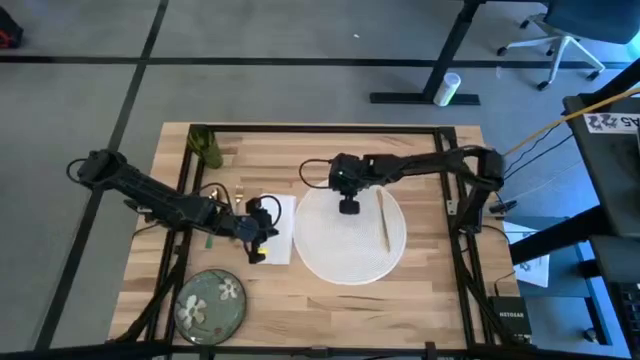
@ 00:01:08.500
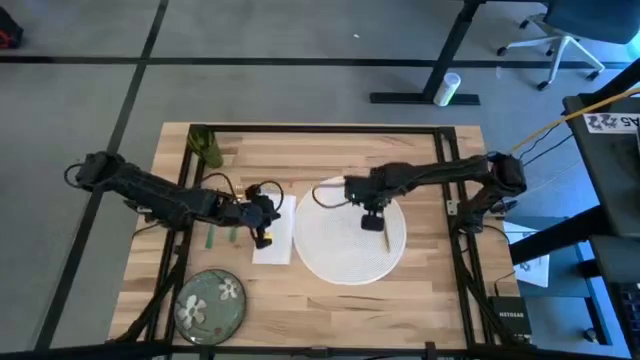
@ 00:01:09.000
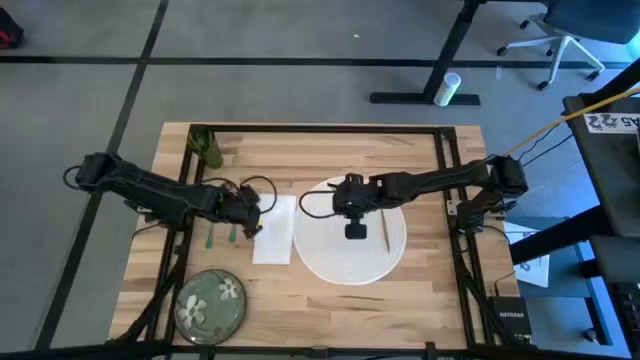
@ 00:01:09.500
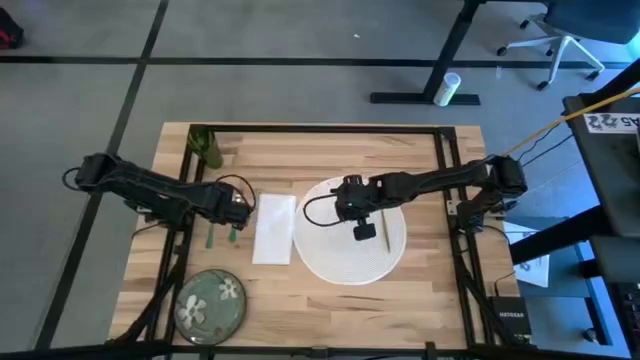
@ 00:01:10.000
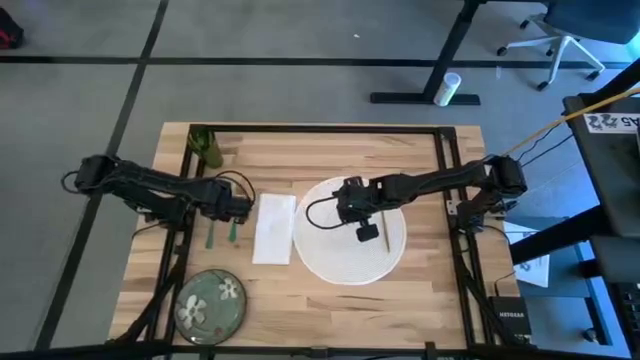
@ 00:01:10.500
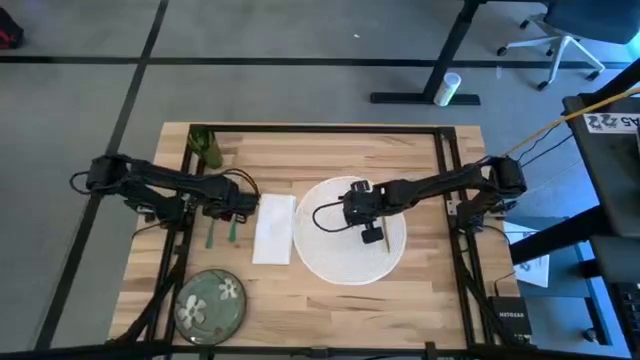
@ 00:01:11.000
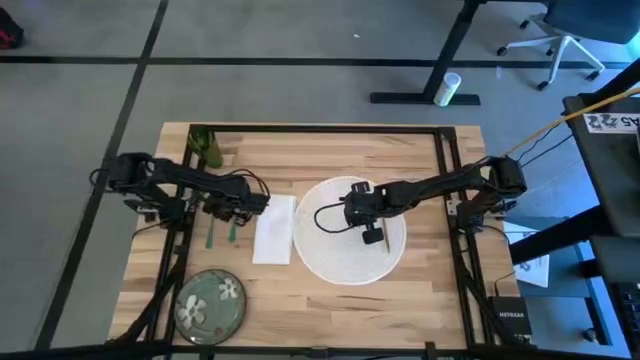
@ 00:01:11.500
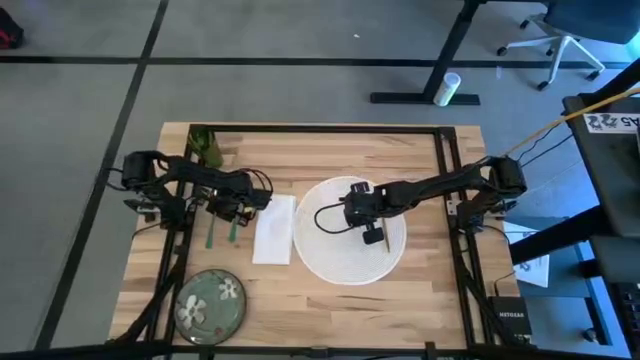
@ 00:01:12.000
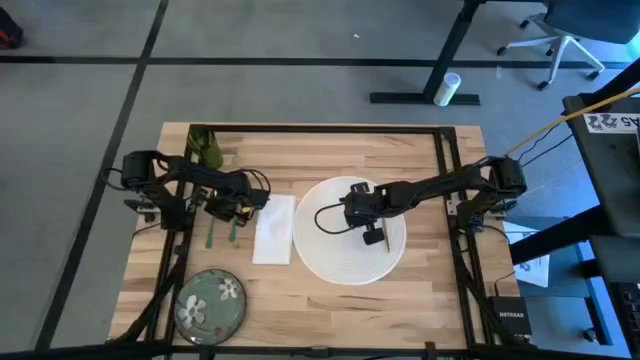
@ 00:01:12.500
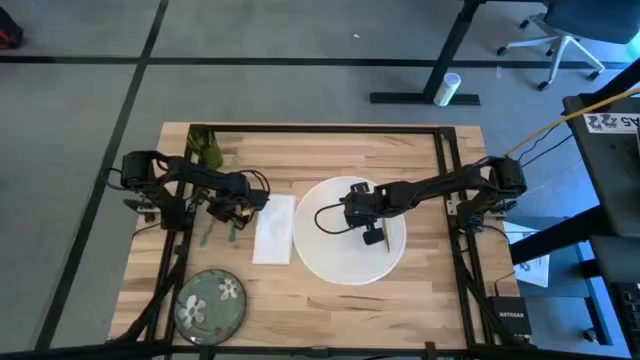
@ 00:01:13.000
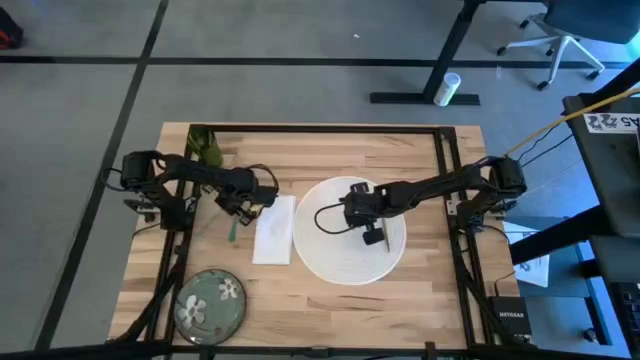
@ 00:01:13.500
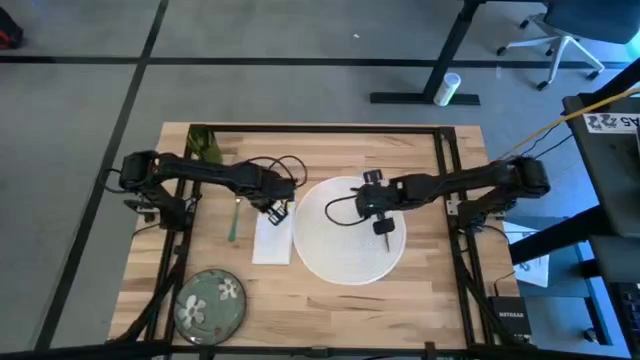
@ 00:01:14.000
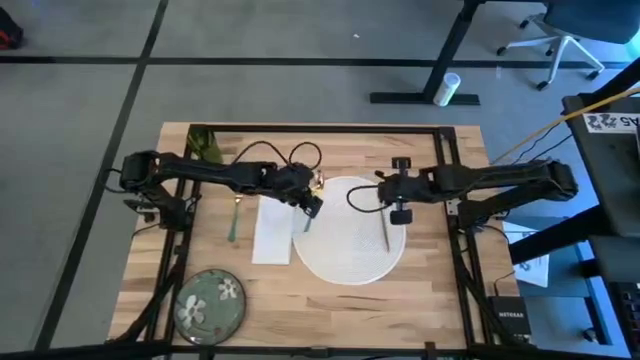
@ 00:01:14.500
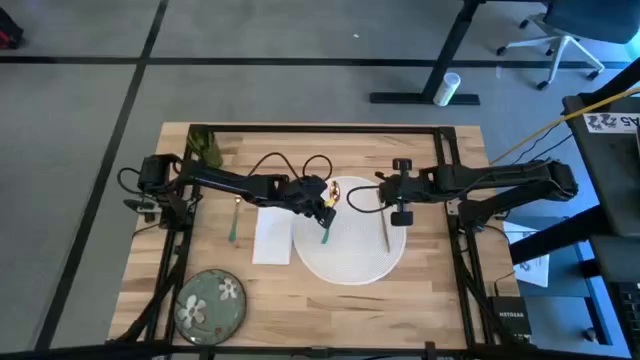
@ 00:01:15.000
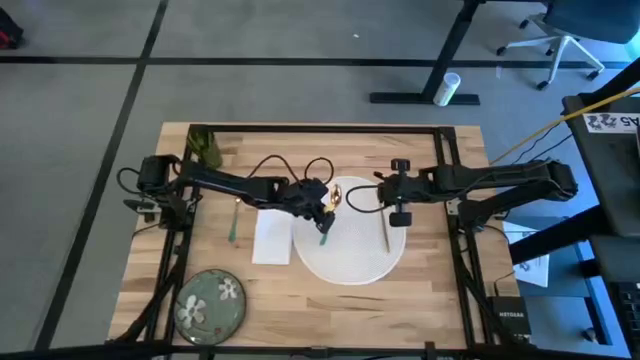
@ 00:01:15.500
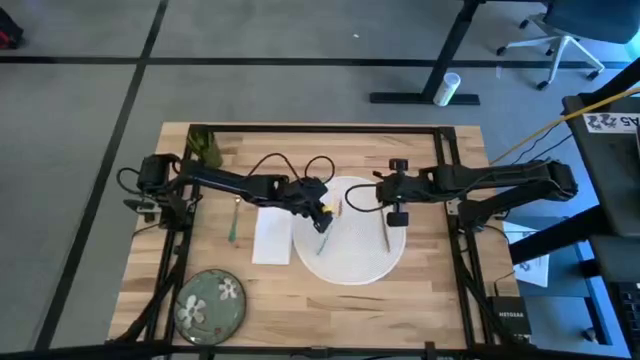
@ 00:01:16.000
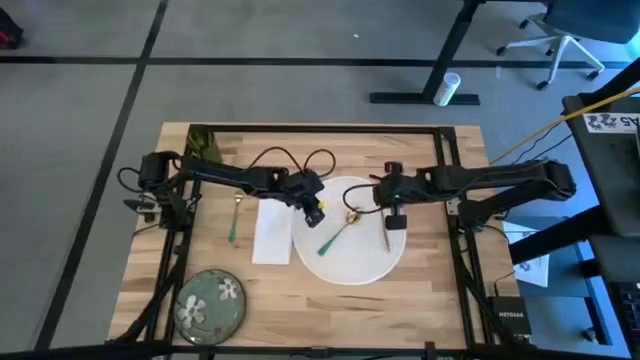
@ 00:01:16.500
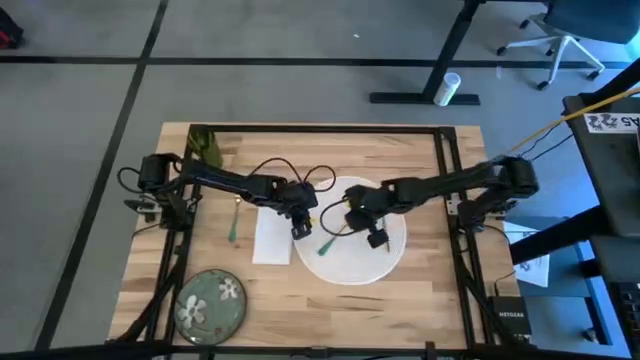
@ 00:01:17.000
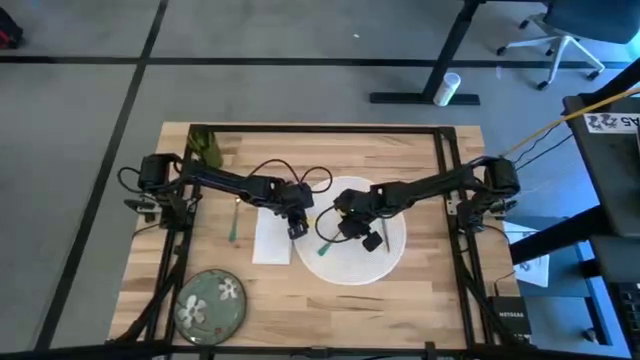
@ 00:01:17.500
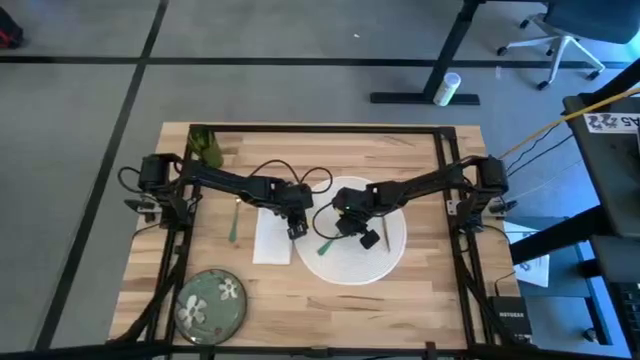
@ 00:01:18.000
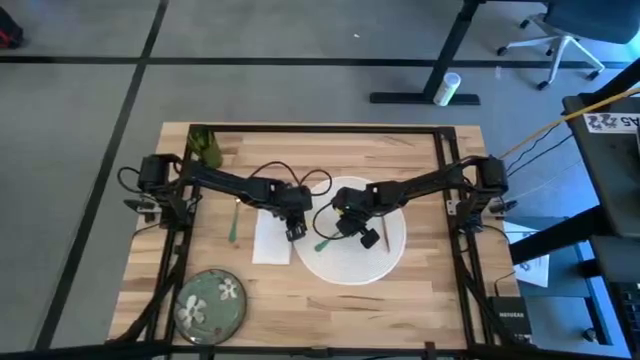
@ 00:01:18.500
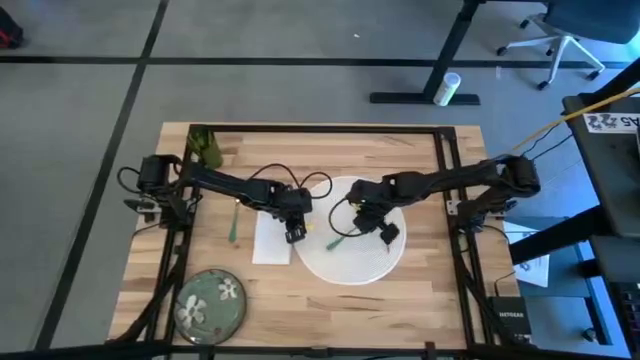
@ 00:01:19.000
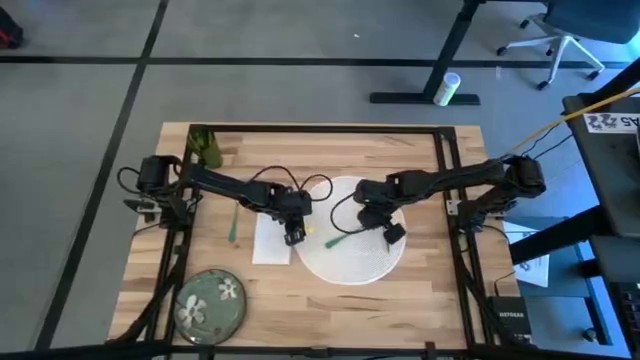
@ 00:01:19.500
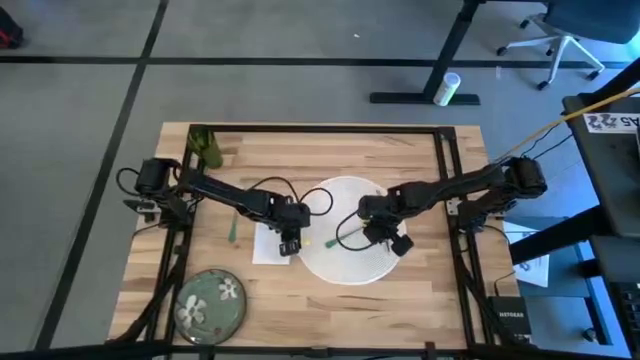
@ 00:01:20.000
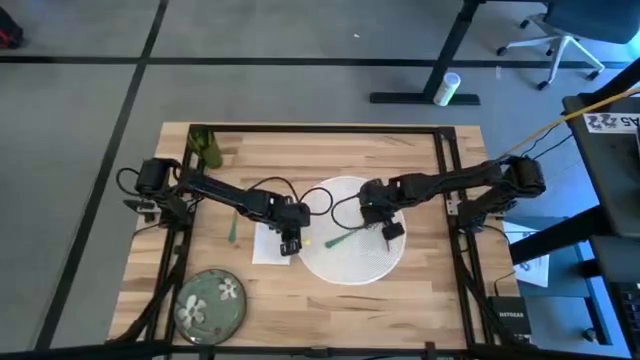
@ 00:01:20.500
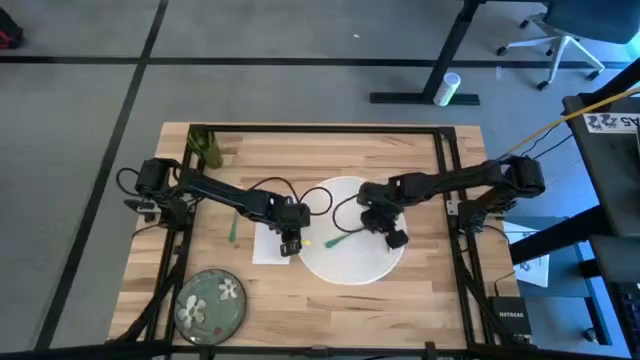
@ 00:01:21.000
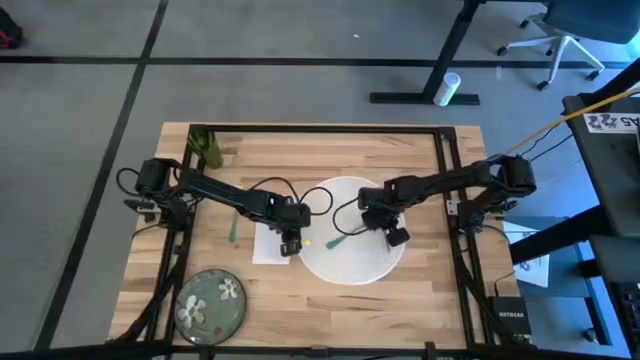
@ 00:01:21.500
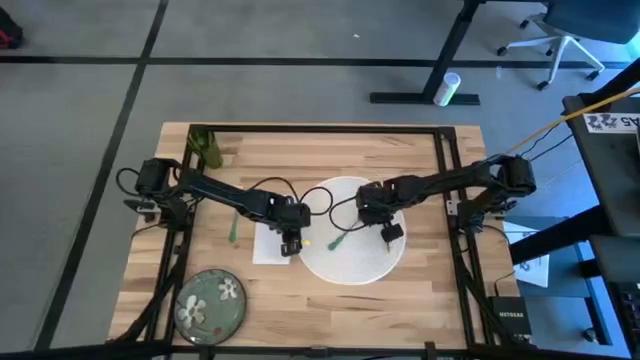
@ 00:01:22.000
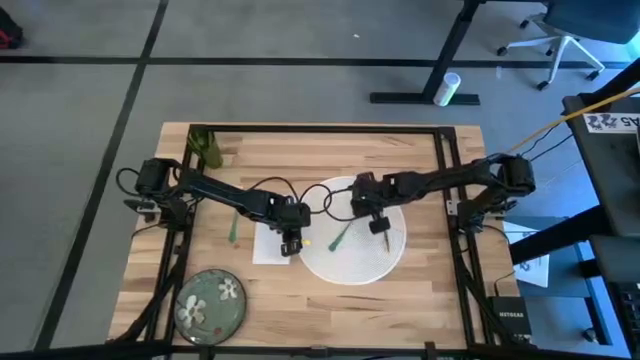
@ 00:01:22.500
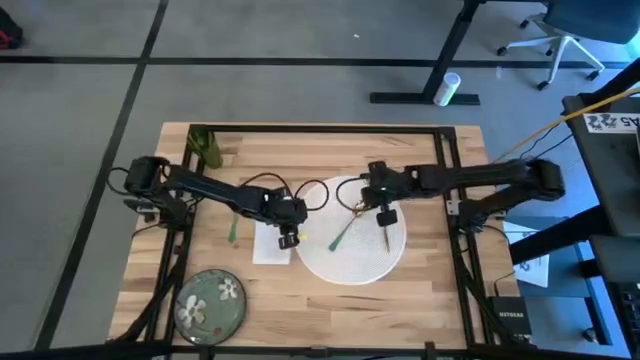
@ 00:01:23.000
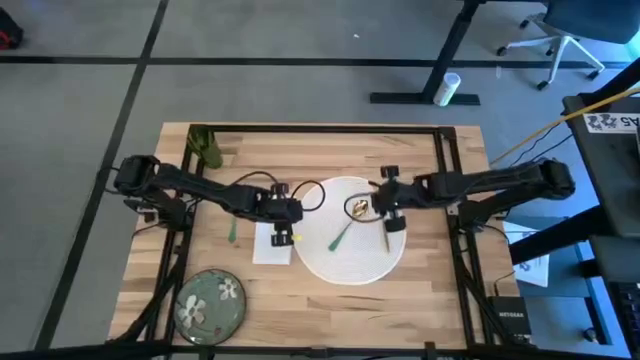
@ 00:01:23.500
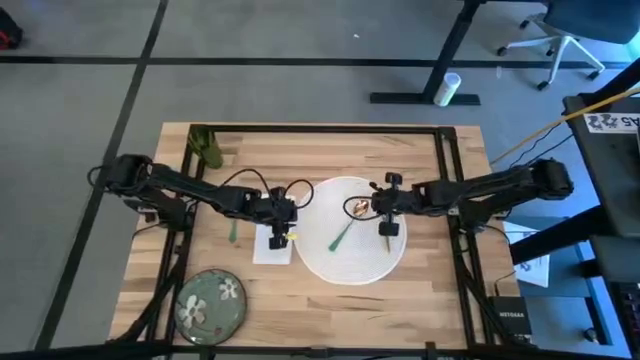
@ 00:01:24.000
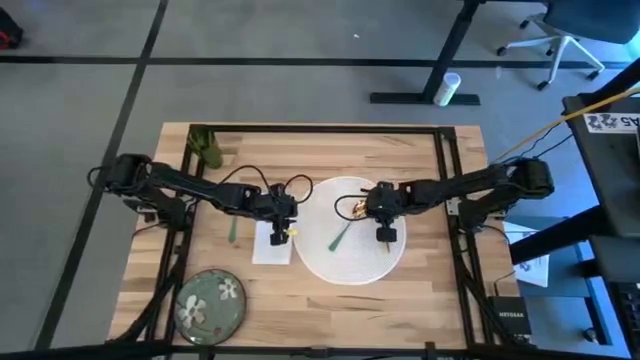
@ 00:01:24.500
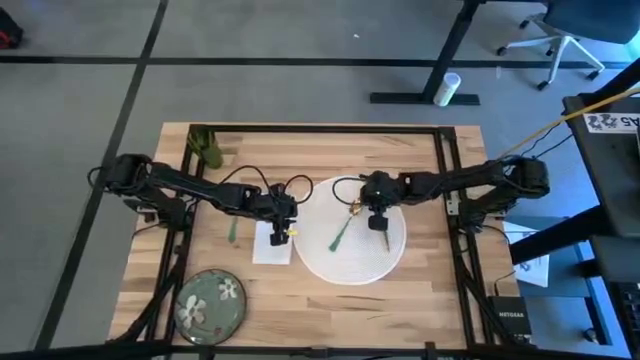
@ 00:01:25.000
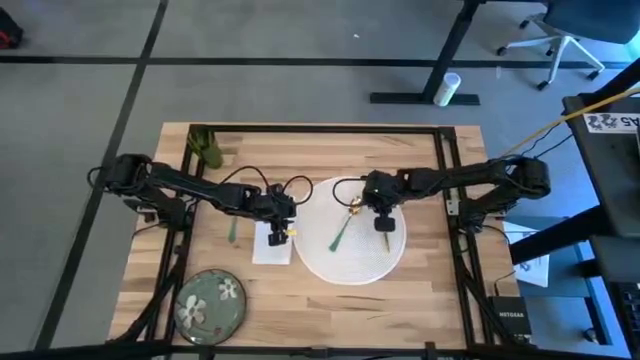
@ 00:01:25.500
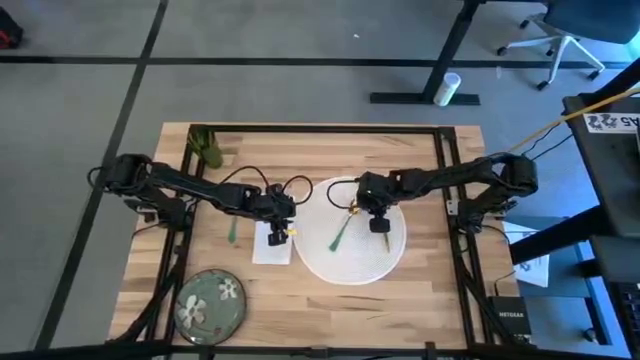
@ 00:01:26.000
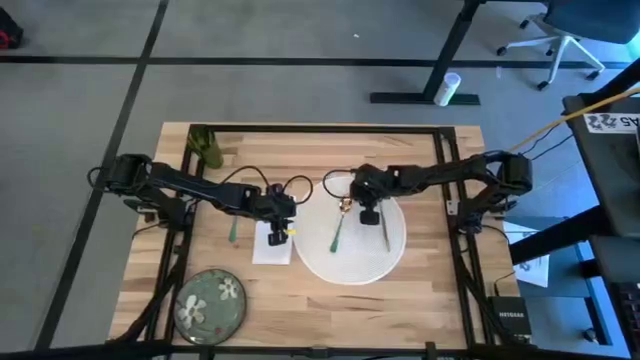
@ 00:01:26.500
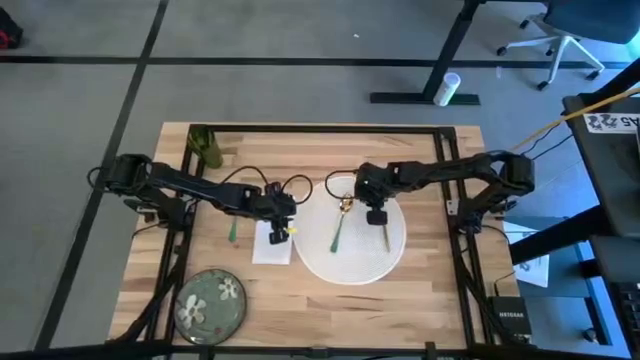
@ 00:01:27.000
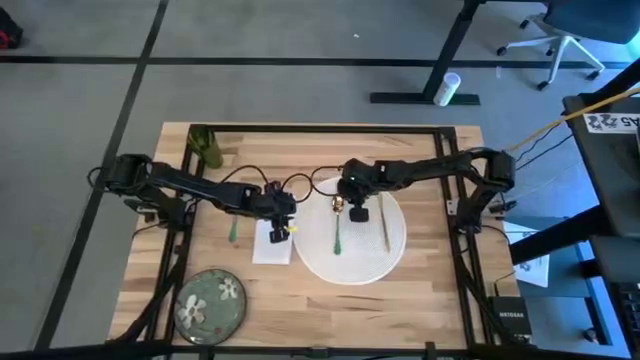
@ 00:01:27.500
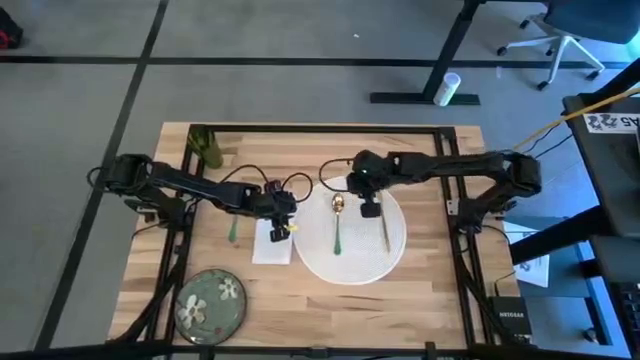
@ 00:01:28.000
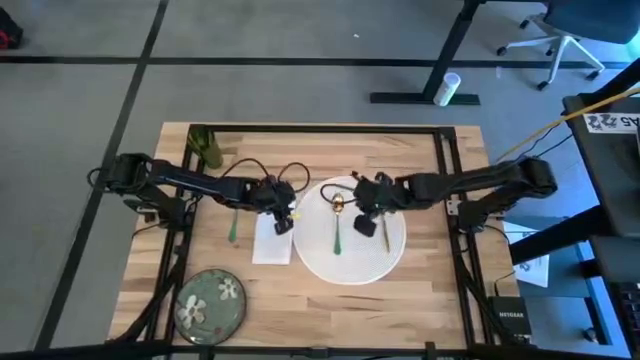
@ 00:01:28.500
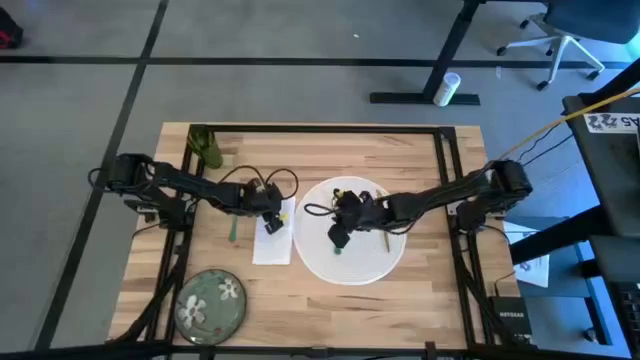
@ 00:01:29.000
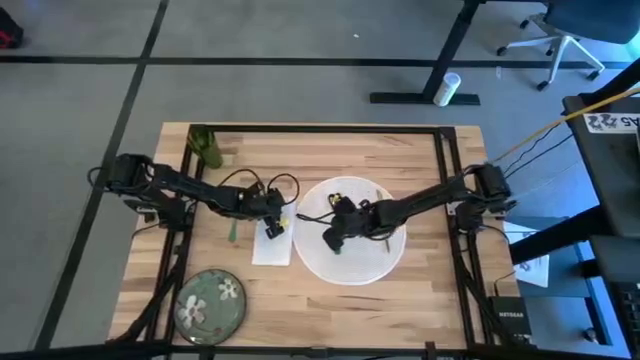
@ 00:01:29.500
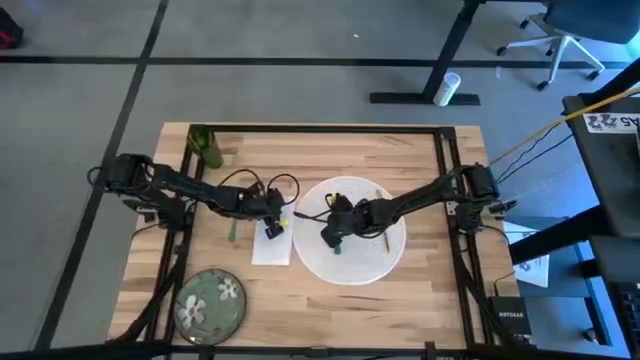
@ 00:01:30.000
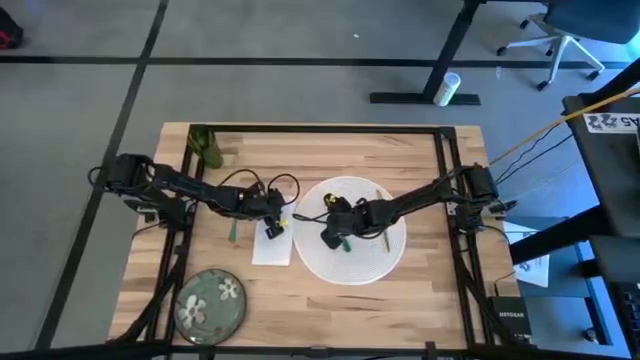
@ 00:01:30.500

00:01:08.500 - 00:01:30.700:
Task: Set table place
Put the green spoon on the white table mat to right of the gold table knife
